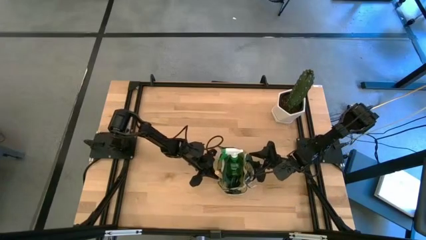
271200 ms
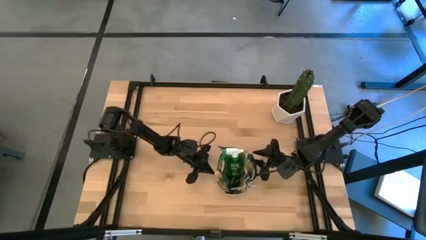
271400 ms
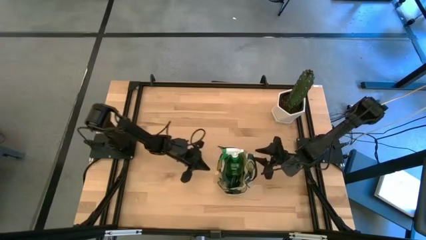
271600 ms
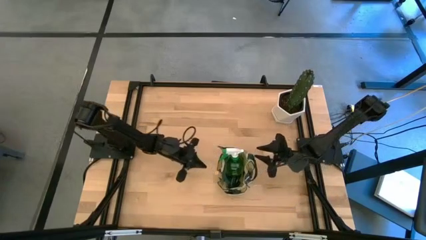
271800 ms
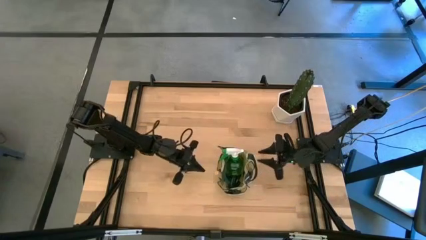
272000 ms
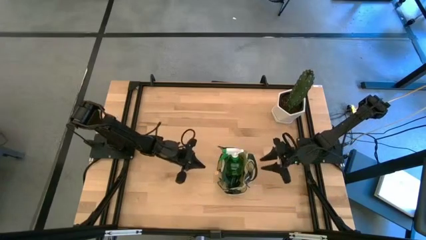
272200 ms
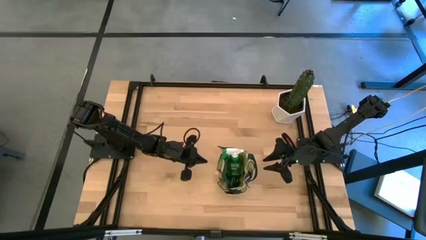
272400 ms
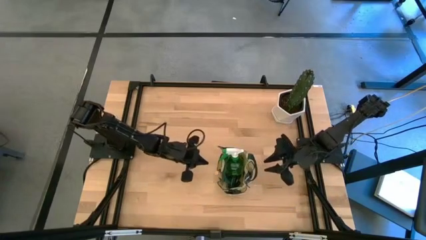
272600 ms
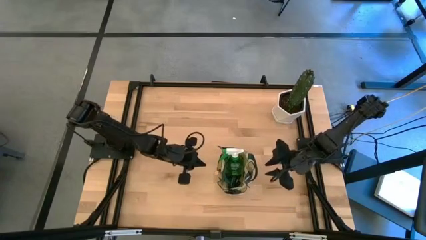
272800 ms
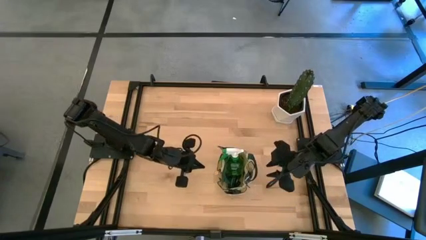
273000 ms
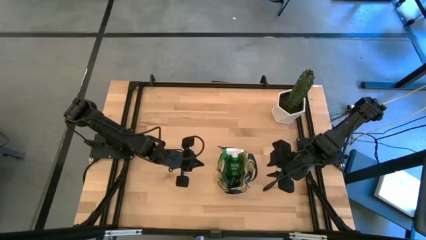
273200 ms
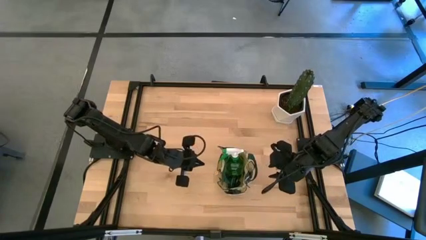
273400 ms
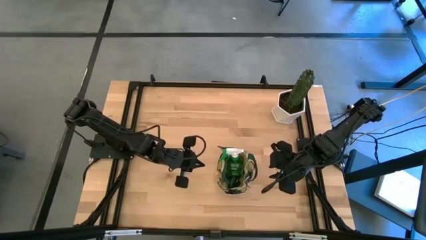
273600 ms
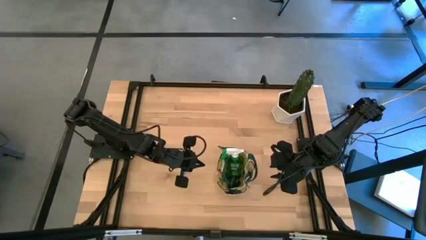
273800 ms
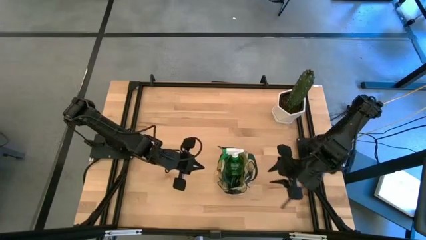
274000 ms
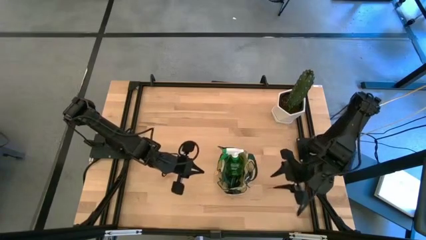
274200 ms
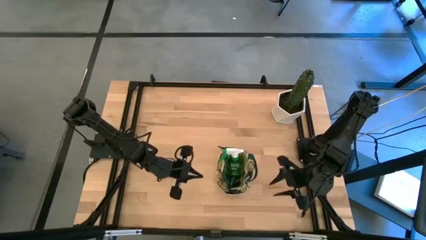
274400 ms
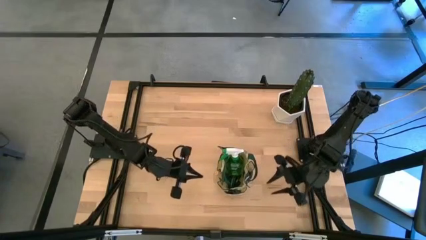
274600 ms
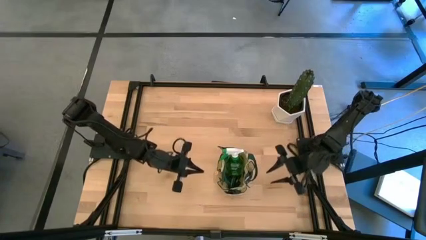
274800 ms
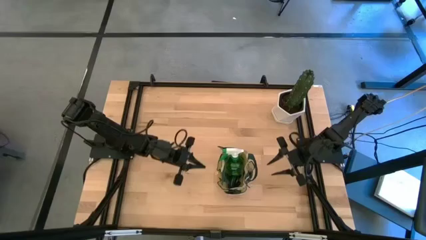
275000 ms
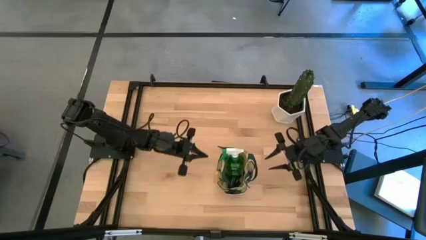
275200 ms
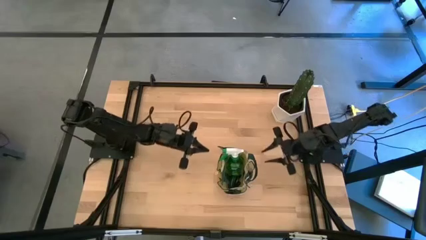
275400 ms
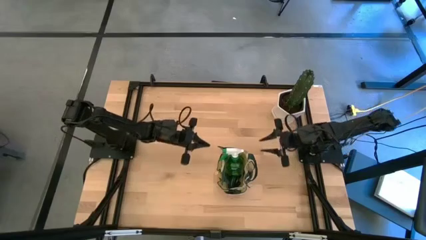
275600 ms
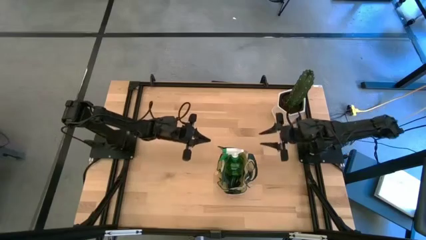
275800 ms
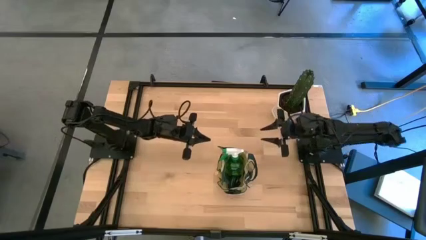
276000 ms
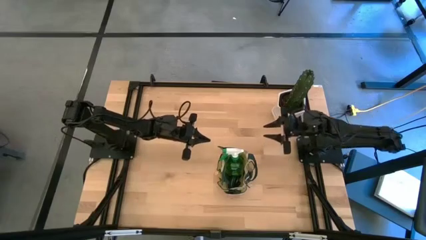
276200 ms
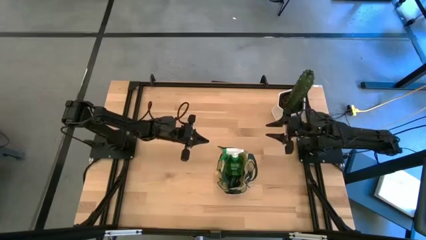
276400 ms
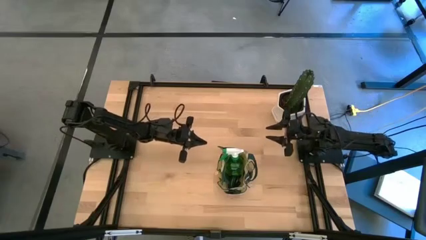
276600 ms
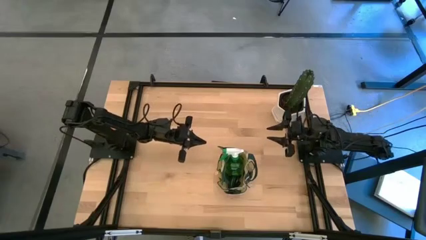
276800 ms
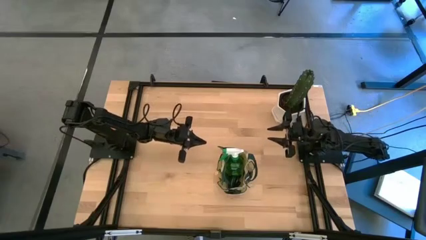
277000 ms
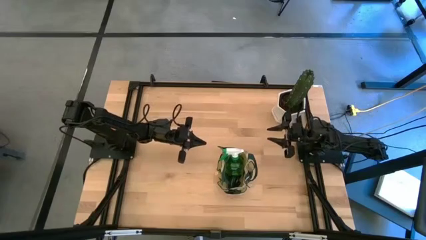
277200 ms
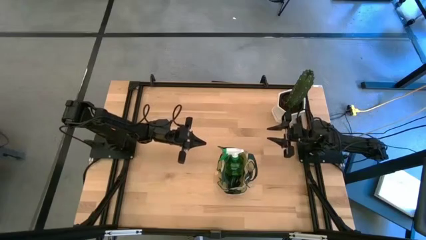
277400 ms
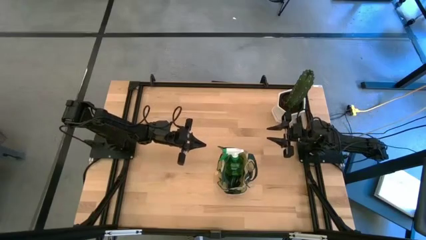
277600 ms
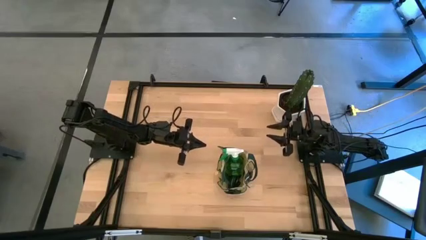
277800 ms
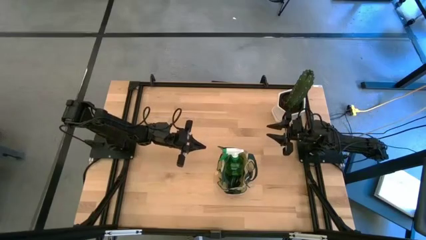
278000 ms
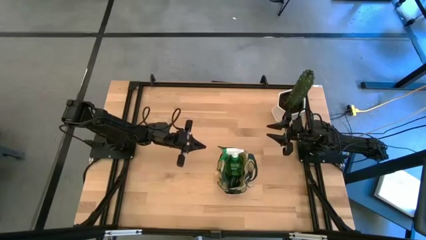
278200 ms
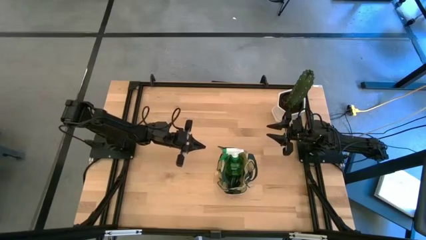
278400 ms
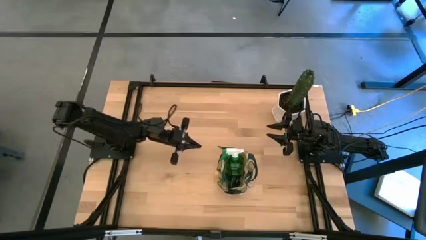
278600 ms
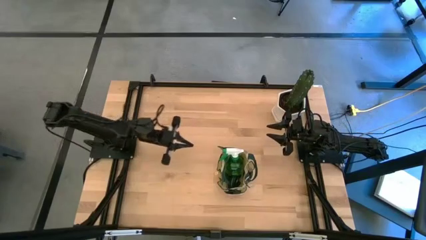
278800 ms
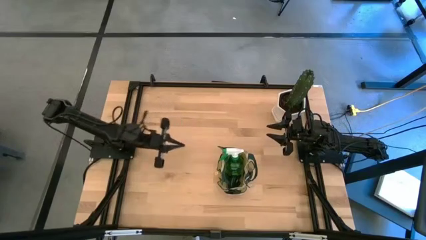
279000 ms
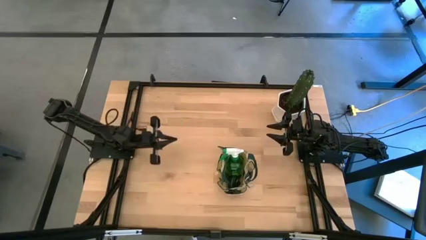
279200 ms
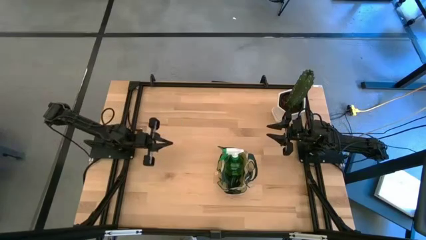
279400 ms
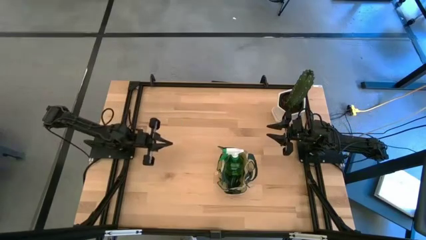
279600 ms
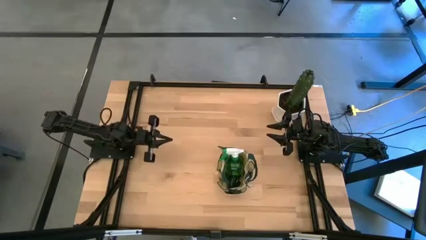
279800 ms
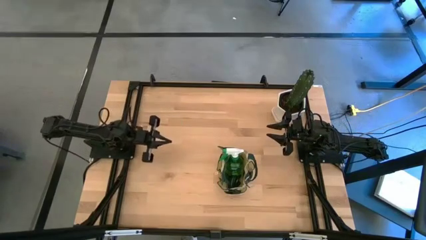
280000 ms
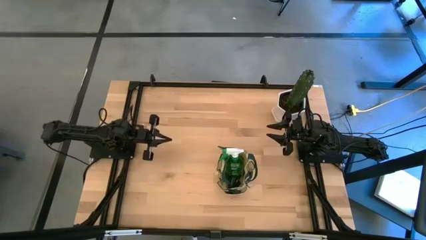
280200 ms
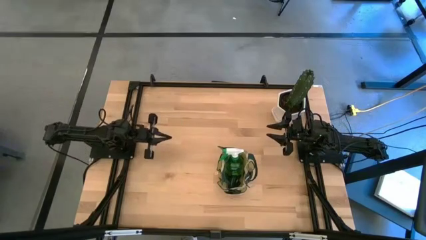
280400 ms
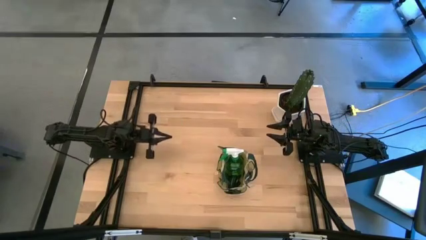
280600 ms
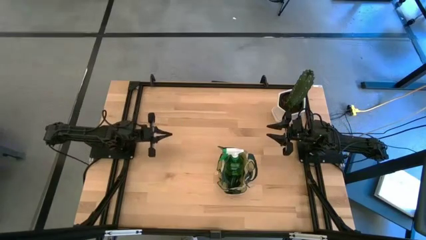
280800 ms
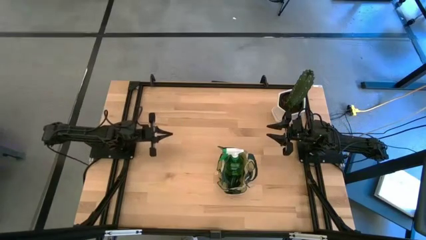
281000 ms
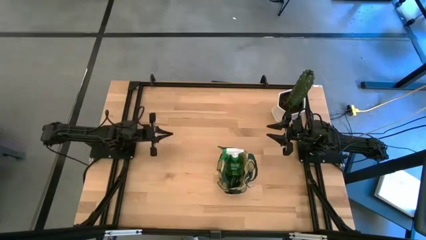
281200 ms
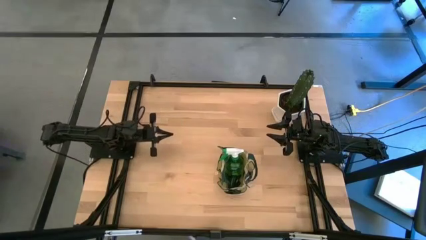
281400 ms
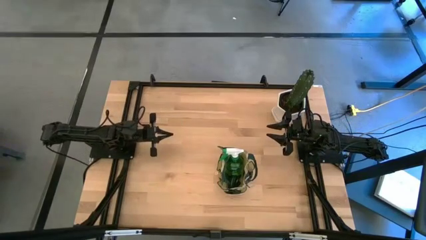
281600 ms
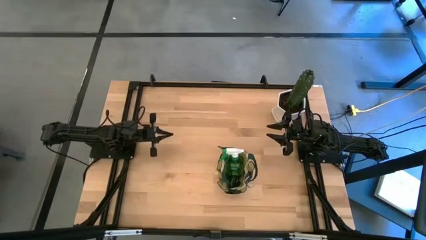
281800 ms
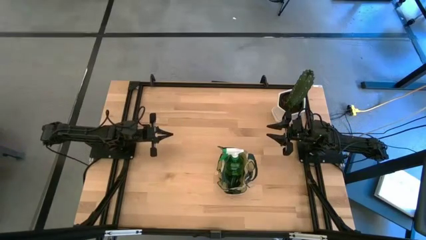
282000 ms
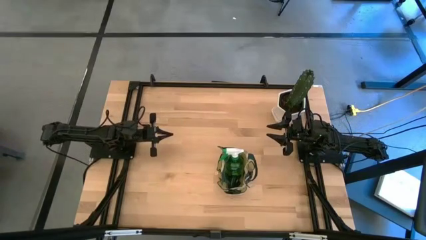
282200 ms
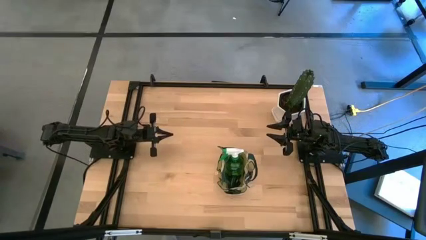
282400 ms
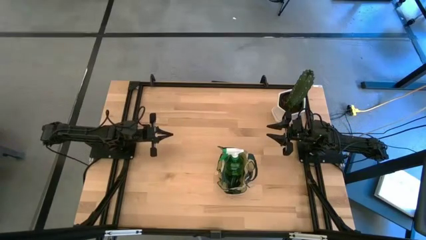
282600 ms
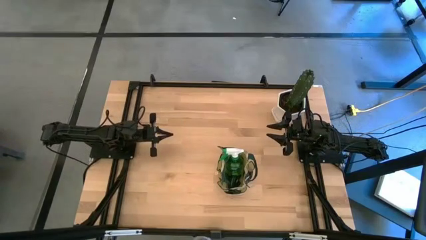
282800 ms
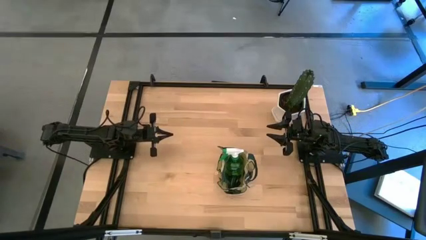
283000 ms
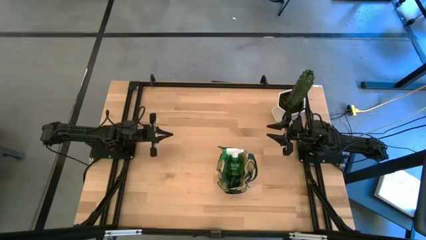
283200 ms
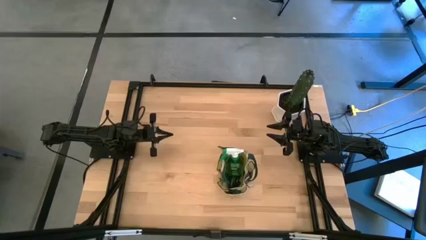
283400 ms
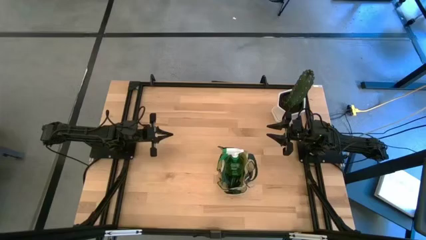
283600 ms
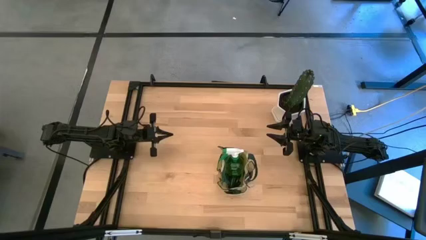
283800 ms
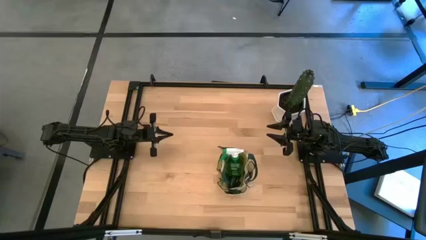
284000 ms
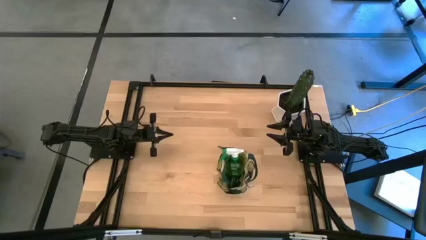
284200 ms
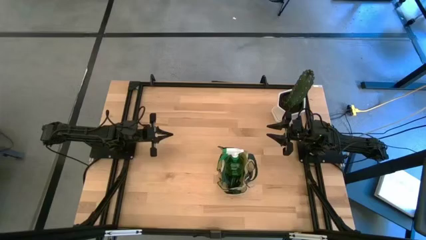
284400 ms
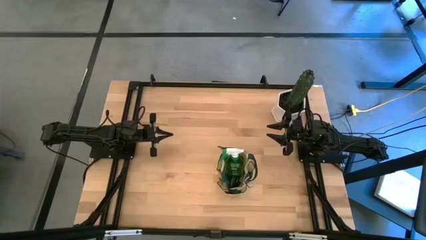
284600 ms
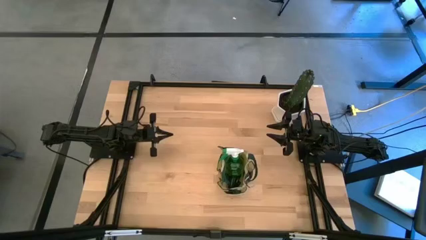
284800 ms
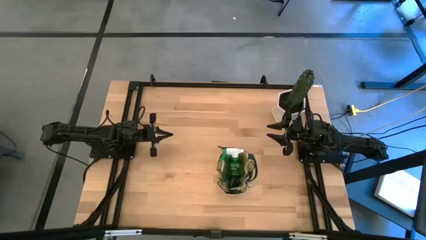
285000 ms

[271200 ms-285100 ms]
Task: Pick & Place Garden tools in Gardening bag
Return to Home Position
